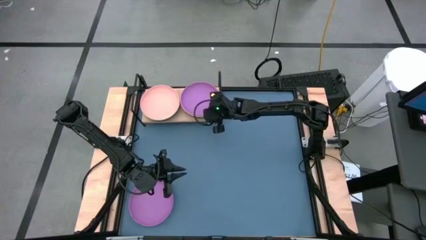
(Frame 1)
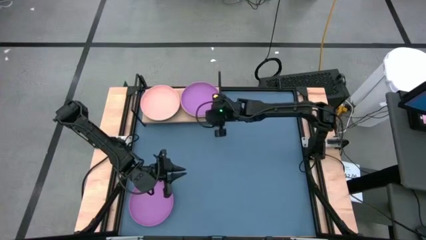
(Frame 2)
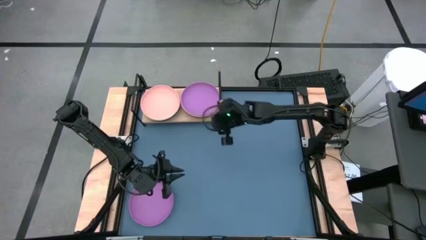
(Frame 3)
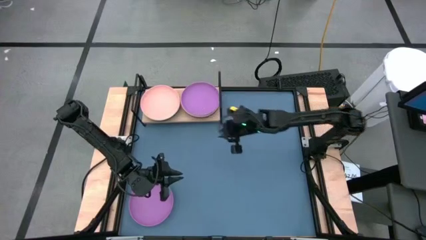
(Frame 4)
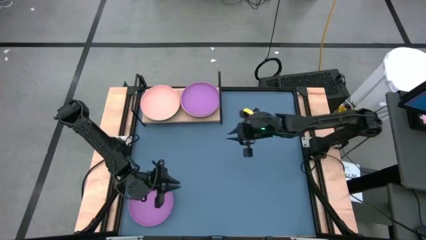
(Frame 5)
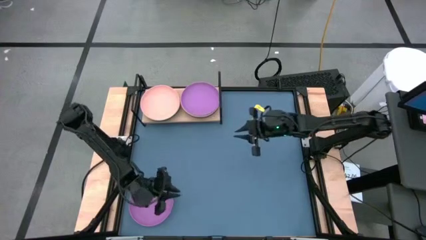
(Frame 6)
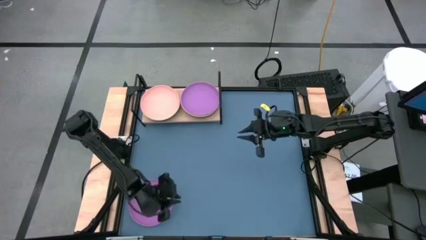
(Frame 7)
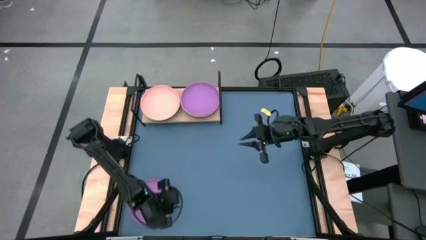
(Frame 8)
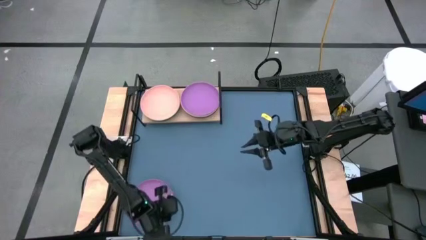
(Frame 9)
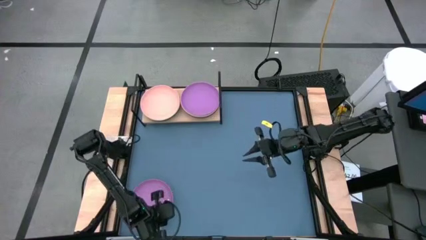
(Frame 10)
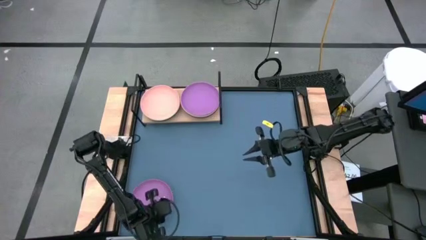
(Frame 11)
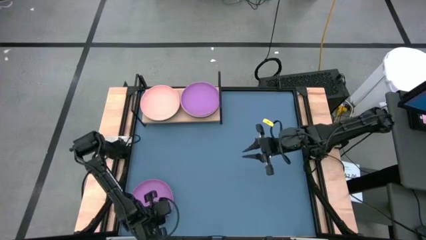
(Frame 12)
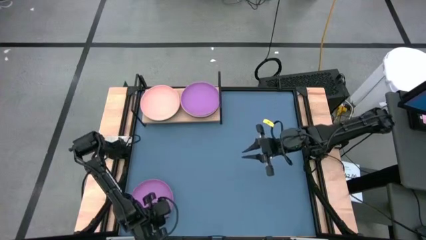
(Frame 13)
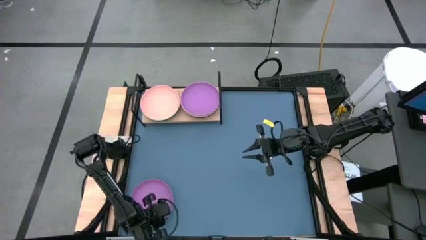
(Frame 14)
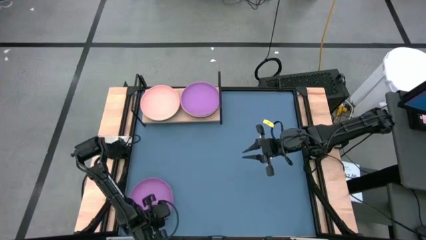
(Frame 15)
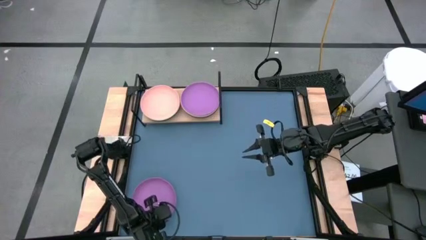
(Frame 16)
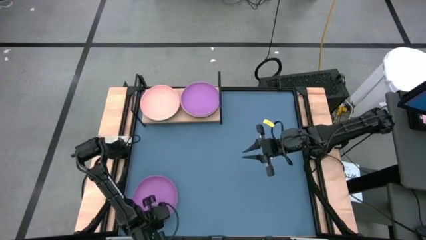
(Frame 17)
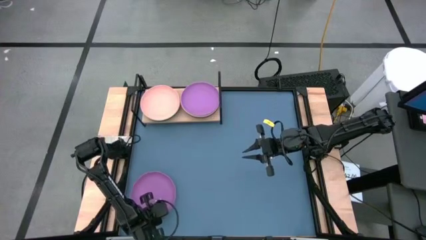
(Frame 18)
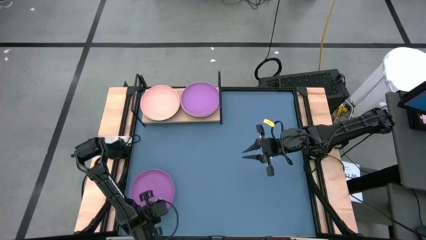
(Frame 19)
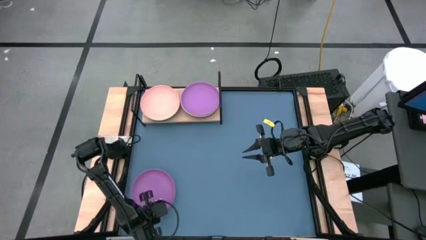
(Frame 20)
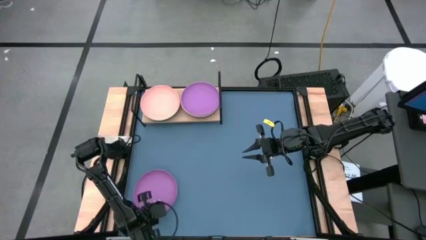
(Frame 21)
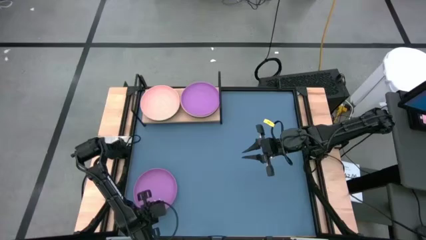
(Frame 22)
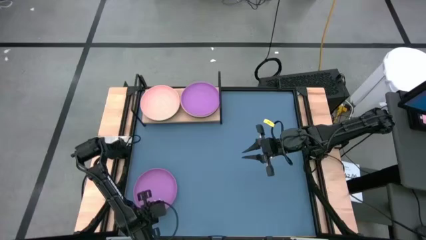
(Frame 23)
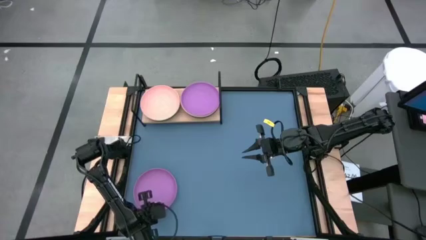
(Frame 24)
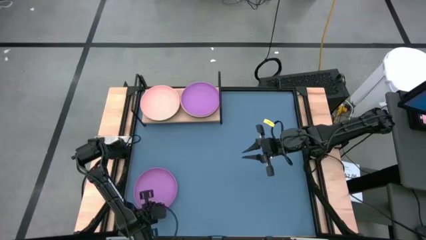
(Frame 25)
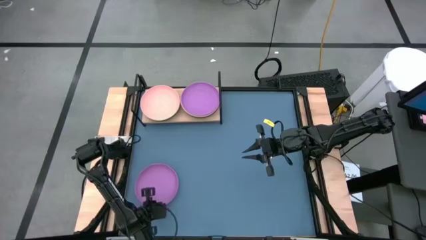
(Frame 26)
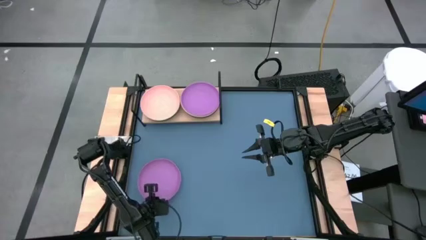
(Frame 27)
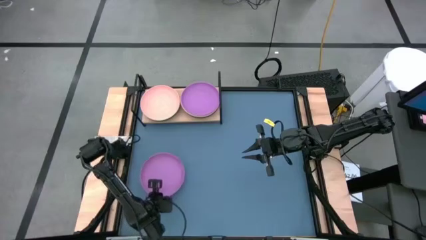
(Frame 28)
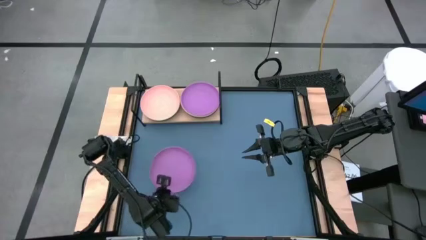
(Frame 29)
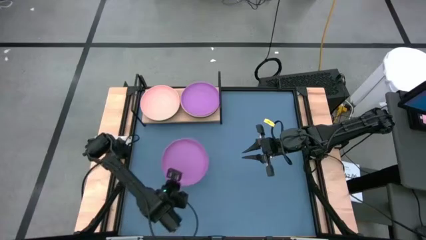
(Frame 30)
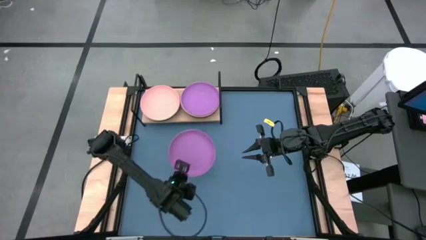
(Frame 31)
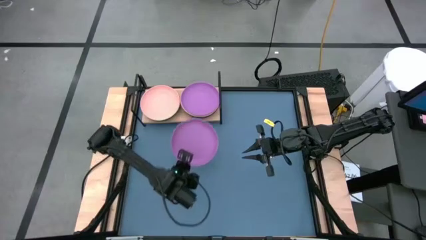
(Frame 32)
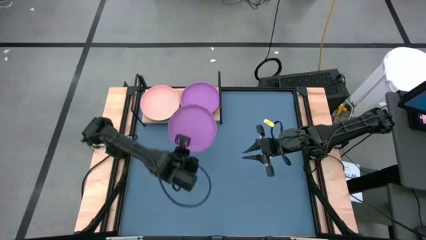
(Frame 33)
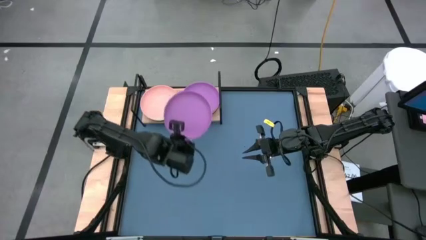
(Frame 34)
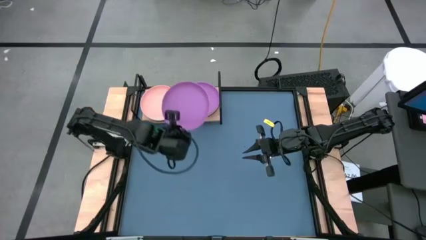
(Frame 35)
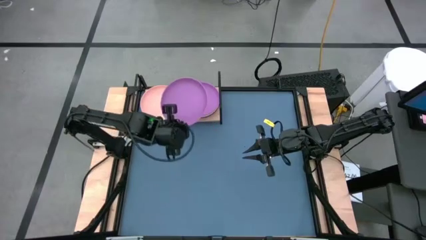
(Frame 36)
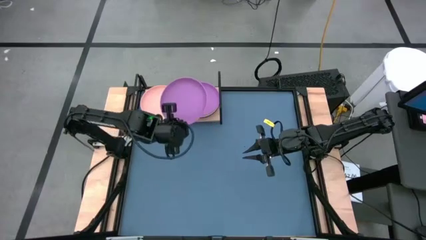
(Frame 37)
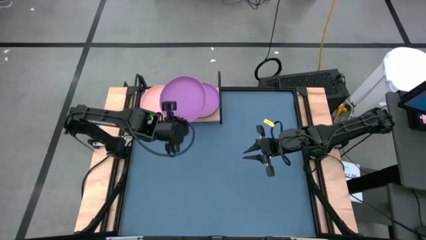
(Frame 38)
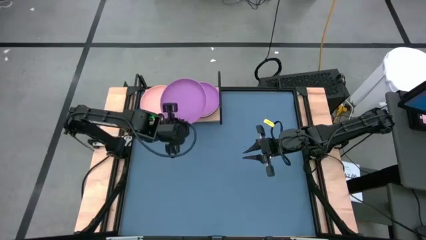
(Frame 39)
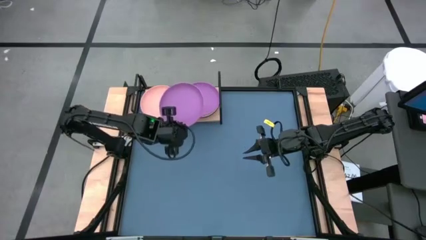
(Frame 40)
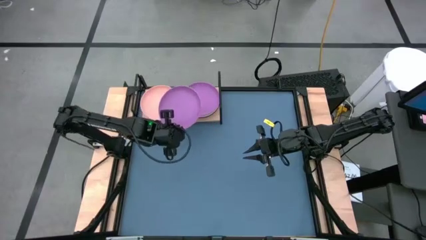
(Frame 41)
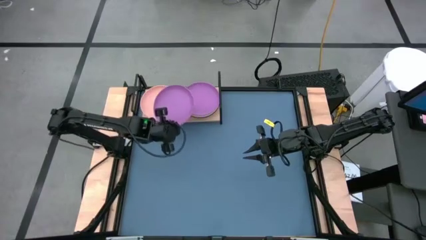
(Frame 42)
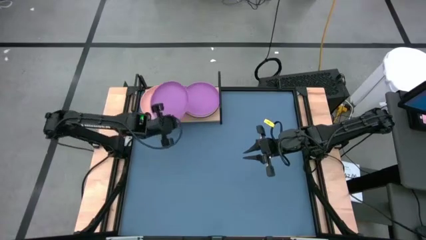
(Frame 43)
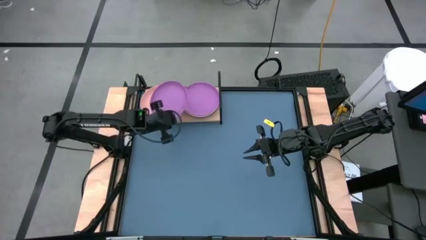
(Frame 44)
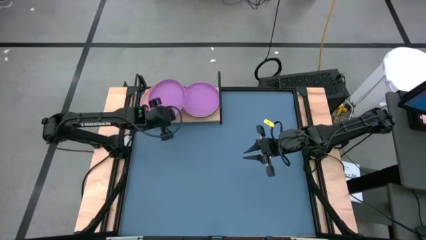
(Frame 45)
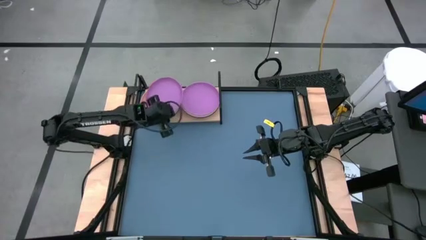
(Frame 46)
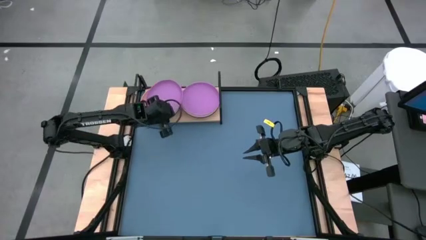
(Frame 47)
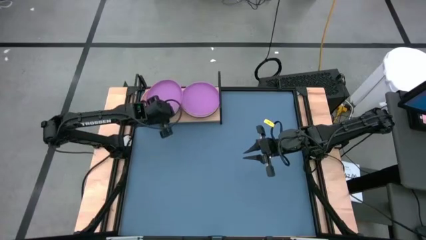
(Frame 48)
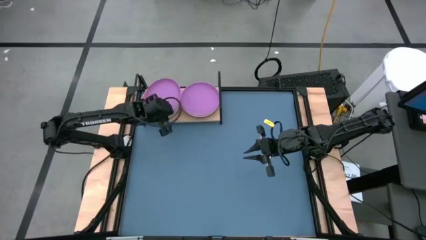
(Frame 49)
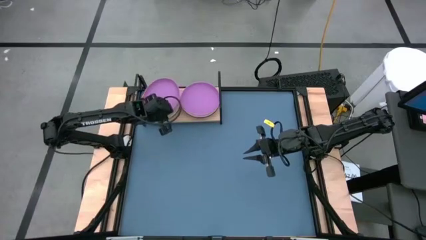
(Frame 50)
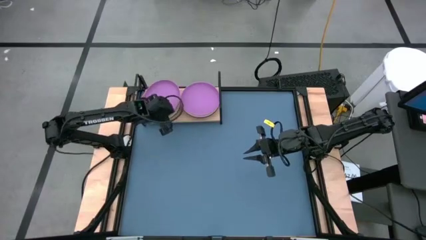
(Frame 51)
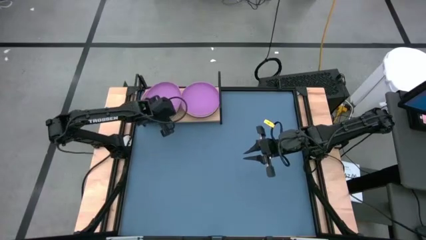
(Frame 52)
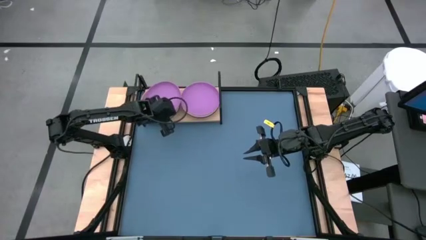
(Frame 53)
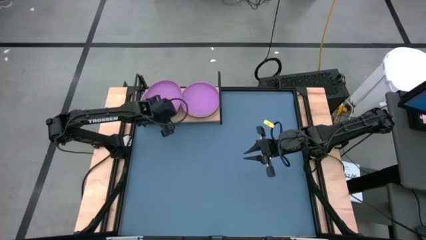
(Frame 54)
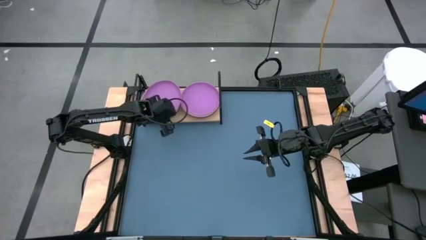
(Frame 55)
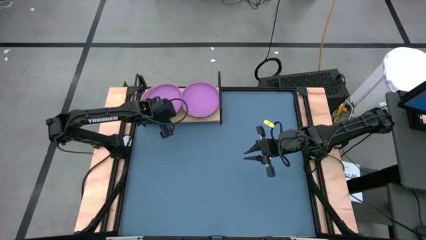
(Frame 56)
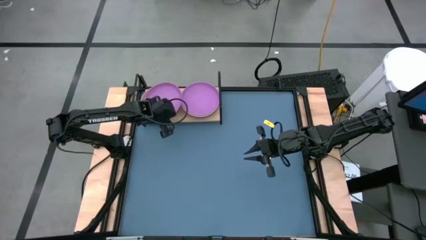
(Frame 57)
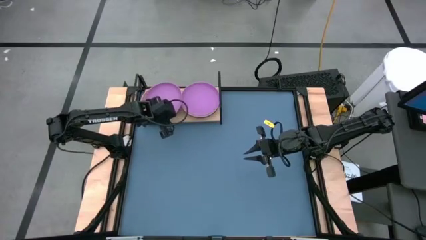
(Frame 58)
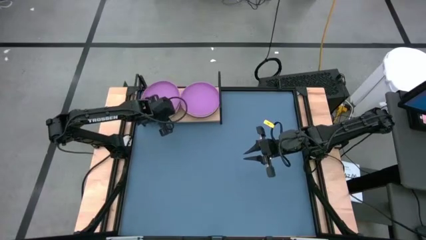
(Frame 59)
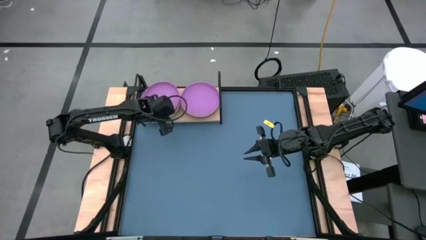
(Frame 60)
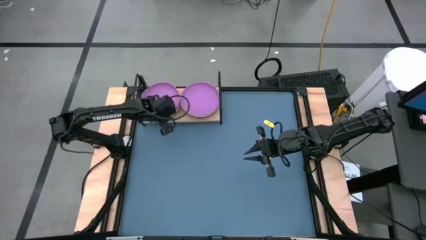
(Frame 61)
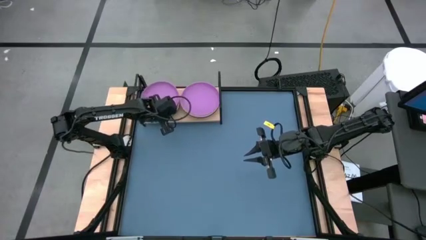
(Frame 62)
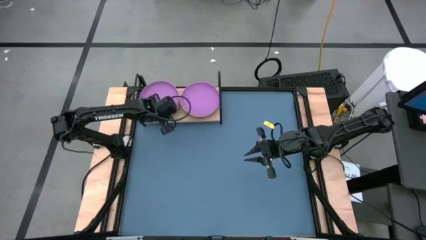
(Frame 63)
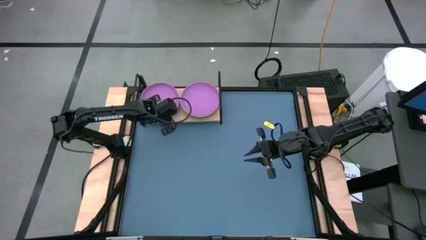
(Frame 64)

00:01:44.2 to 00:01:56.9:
Task: Place and stack plates onto a shelf
Stack the purple plate on top of the left light pink plate on the shelf

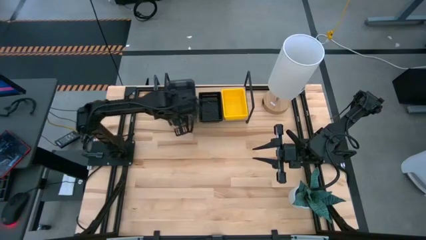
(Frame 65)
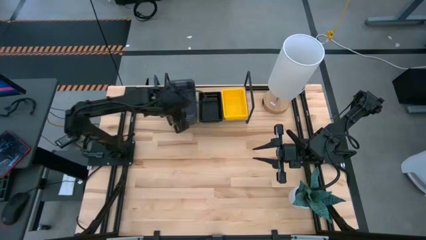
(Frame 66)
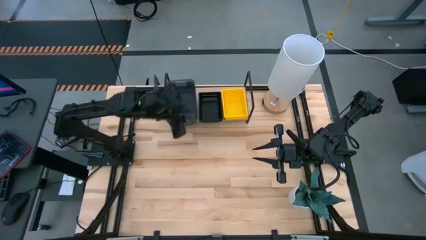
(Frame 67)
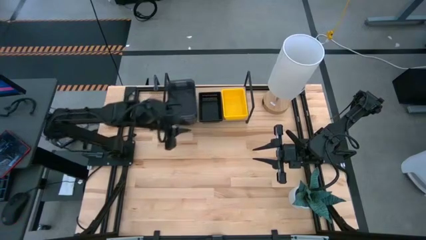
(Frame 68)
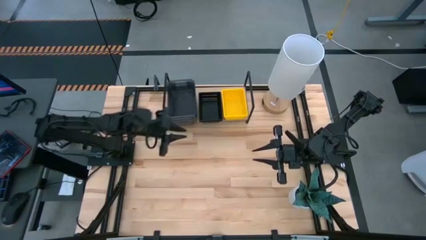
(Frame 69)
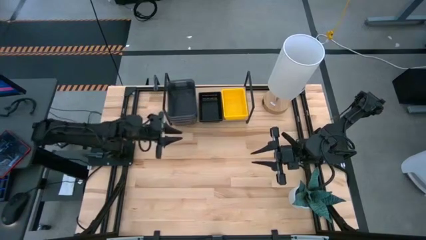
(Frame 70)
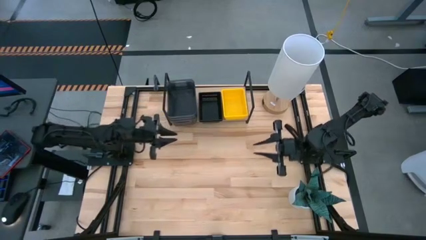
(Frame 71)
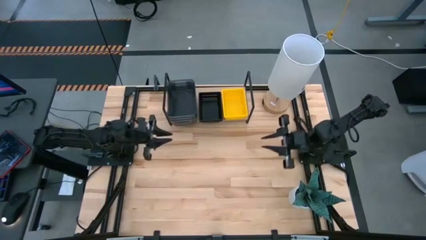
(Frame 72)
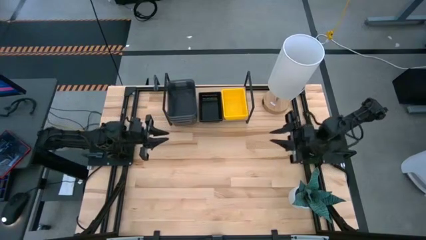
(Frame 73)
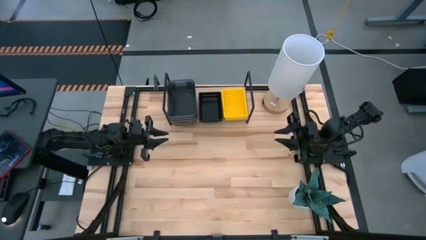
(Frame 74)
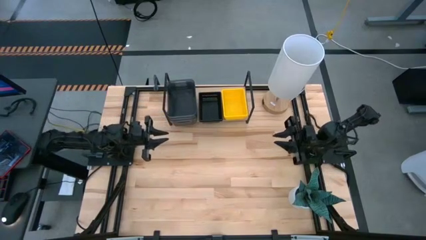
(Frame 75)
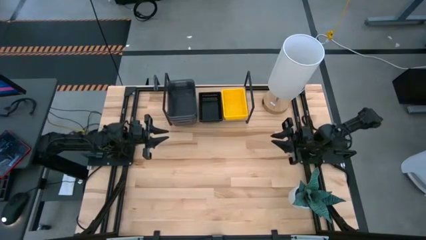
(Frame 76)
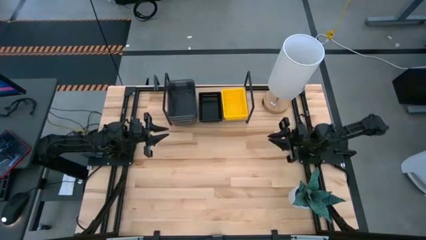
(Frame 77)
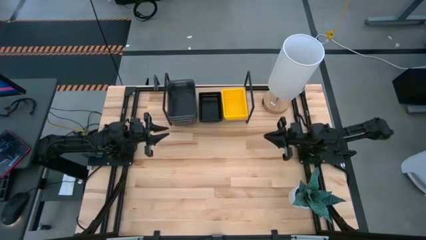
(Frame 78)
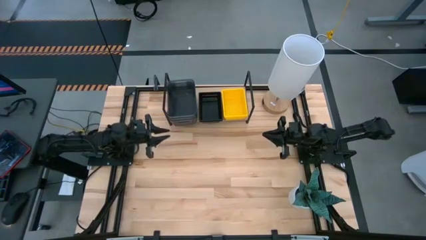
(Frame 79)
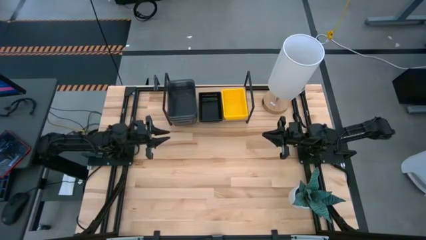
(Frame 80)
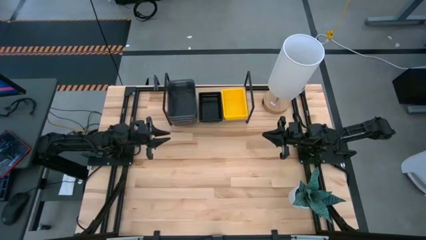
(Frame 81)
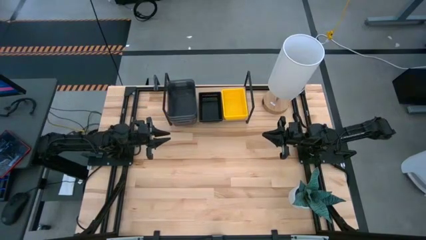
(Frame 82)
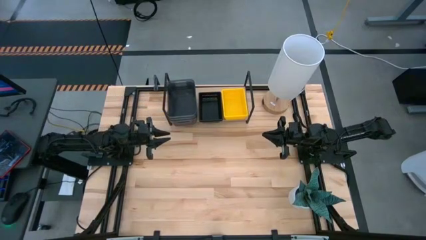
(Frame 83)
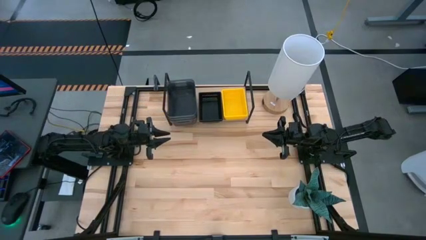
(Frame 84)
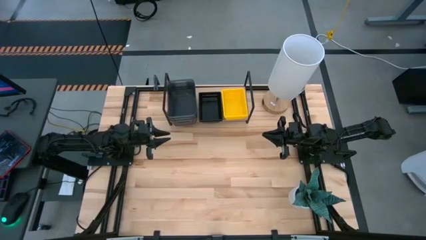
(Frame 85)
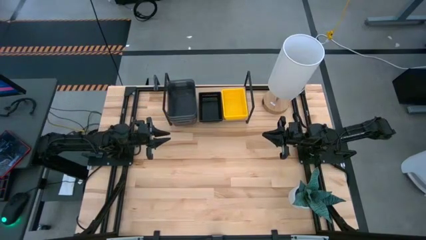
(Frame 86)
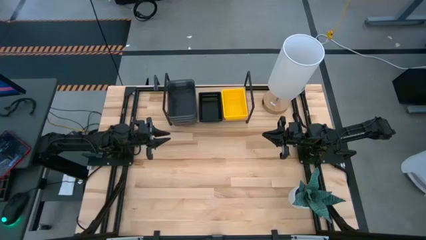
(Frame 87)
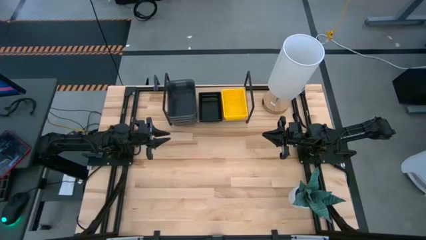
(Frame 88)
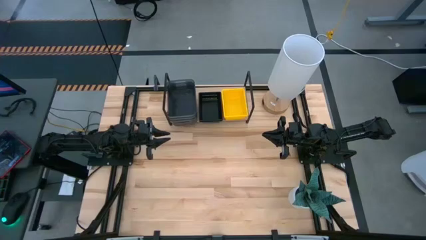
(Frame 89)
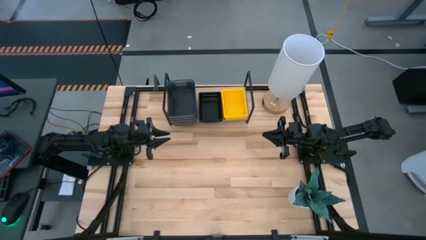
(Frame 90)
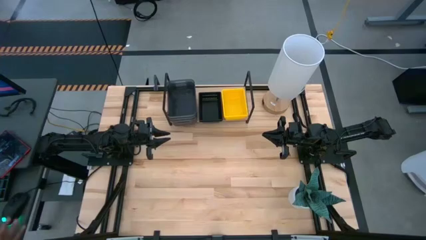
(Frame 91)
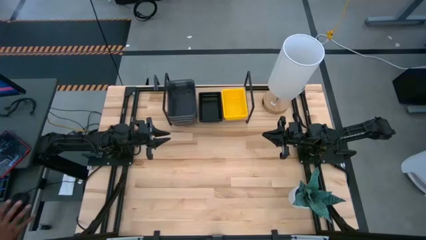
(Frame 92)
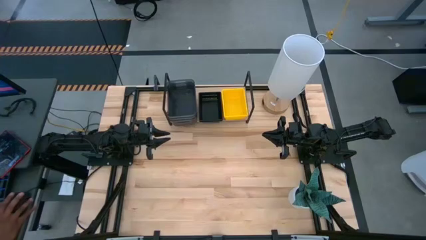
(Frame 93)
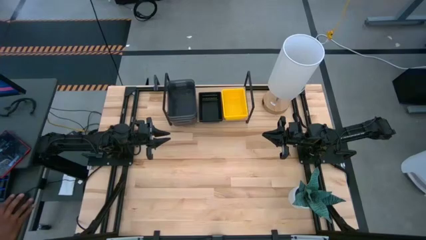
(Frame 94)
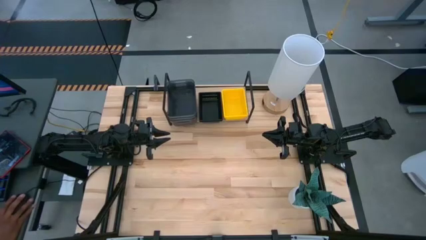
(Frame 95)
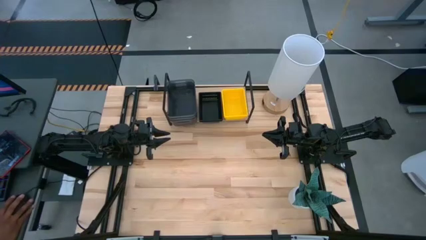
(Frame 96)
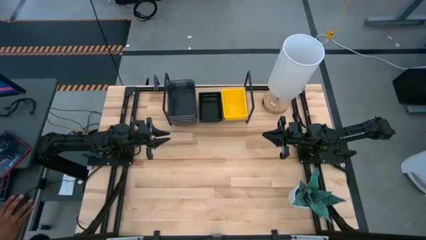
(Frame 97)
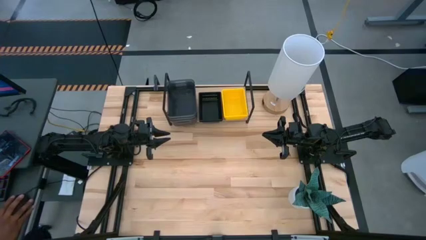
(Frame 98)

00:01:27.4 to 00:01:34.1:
Task: Stack baskets on shelf by color
Return to Home Position
